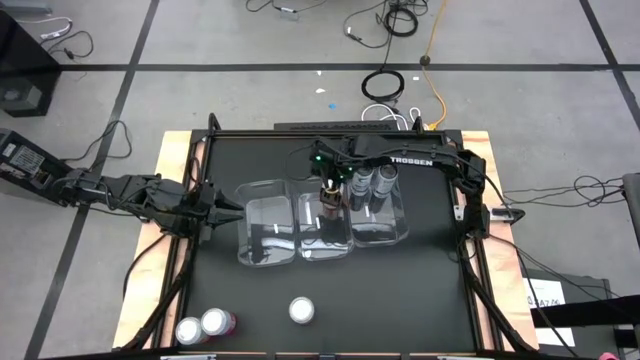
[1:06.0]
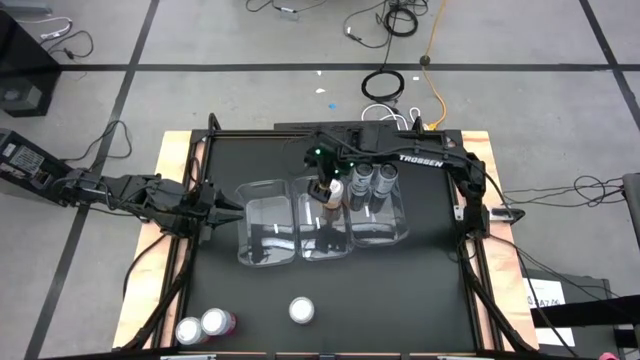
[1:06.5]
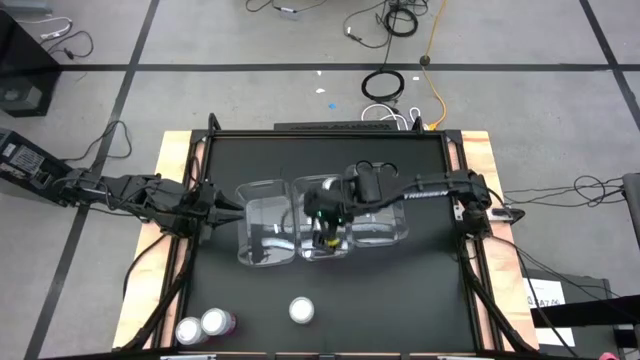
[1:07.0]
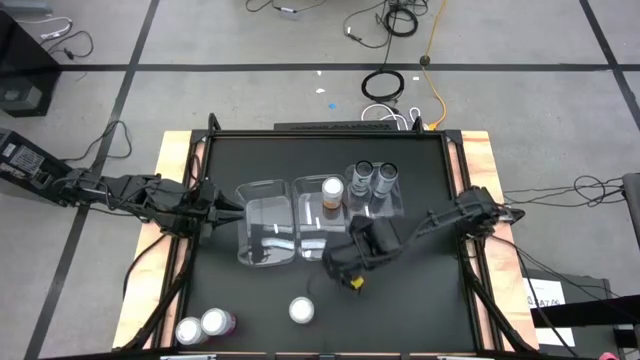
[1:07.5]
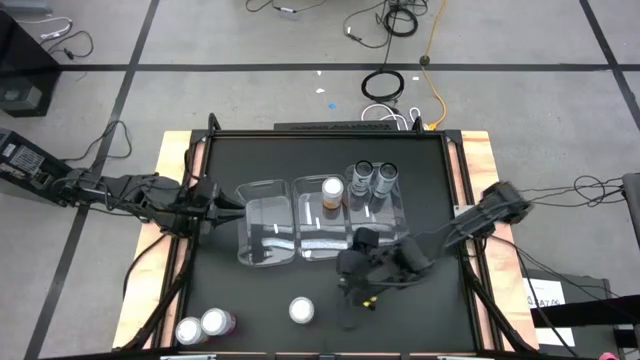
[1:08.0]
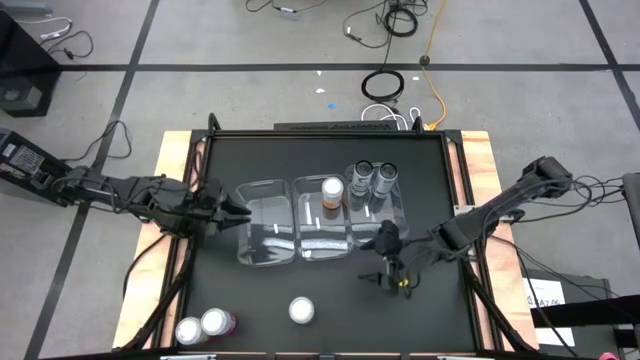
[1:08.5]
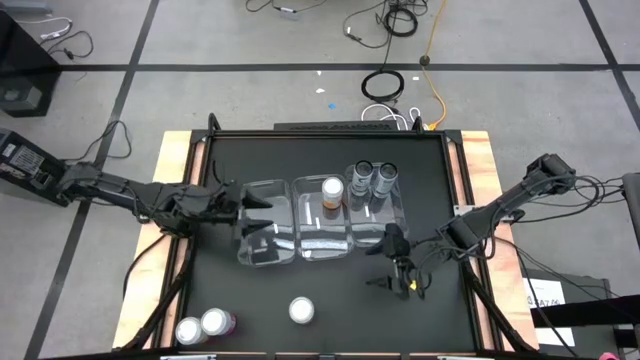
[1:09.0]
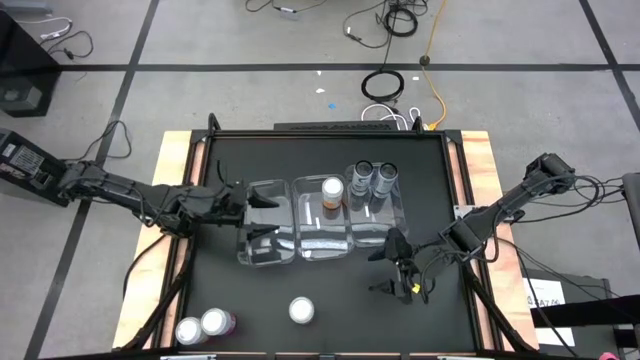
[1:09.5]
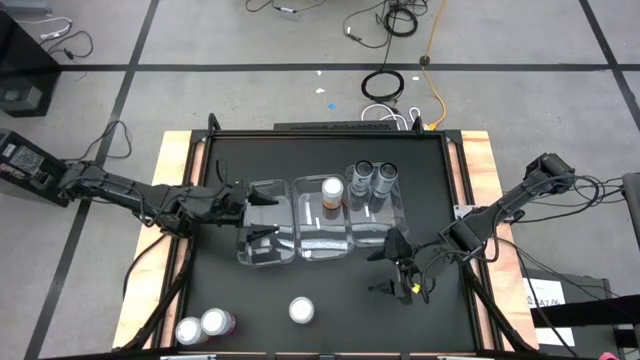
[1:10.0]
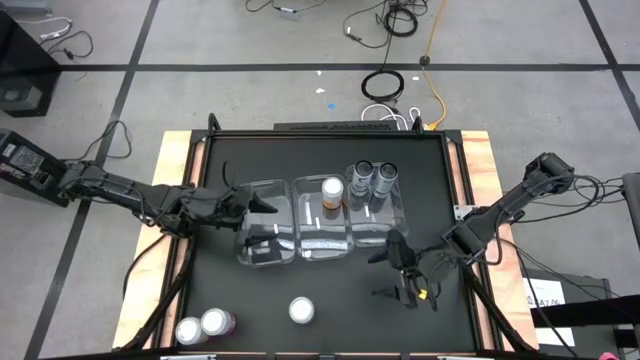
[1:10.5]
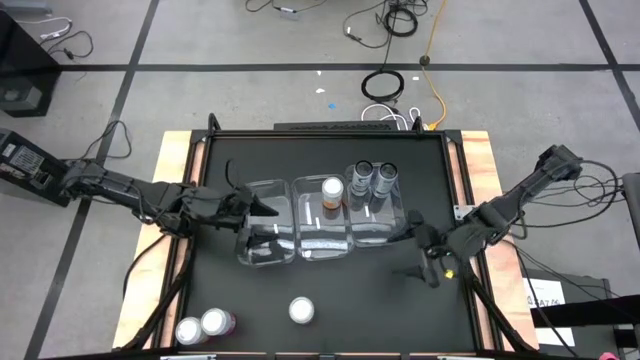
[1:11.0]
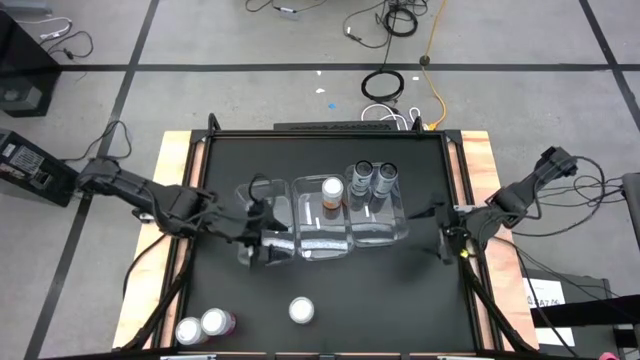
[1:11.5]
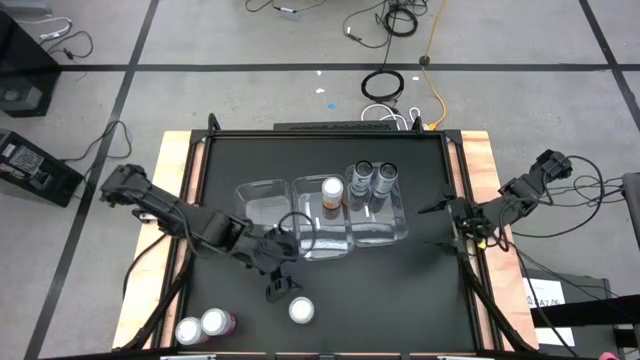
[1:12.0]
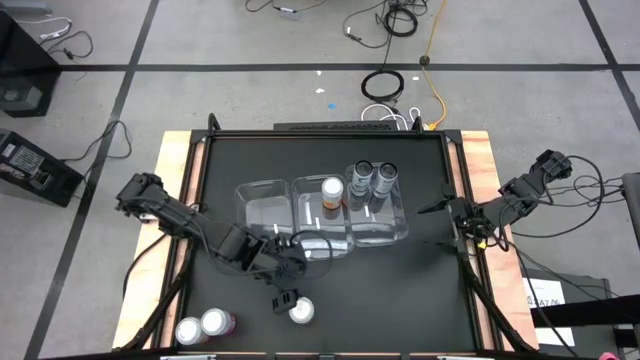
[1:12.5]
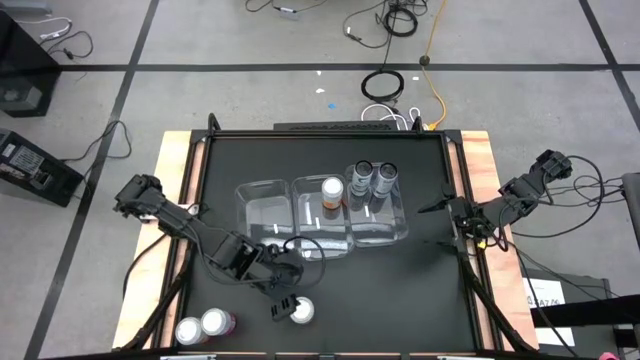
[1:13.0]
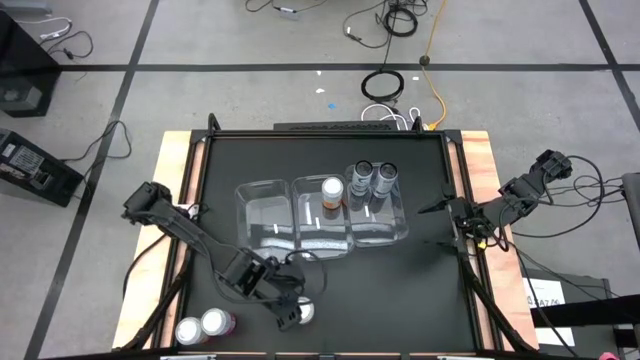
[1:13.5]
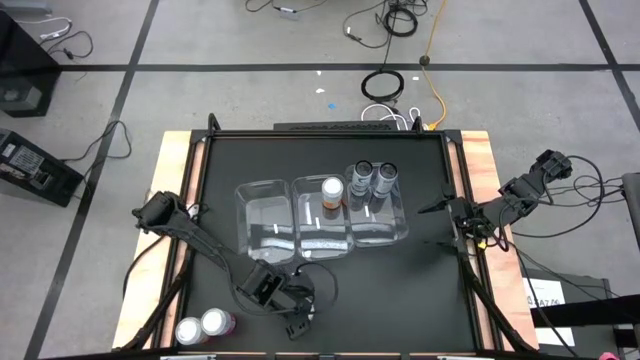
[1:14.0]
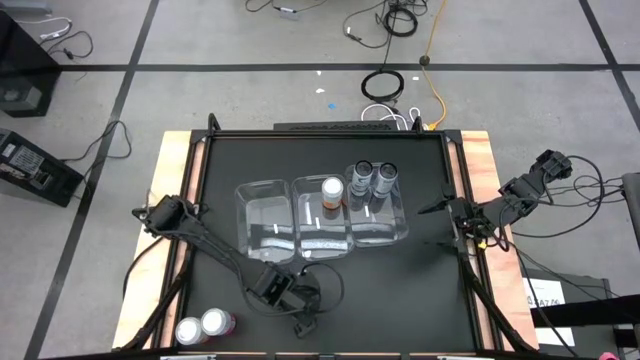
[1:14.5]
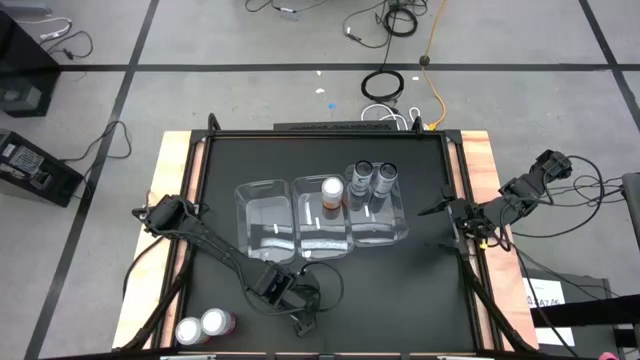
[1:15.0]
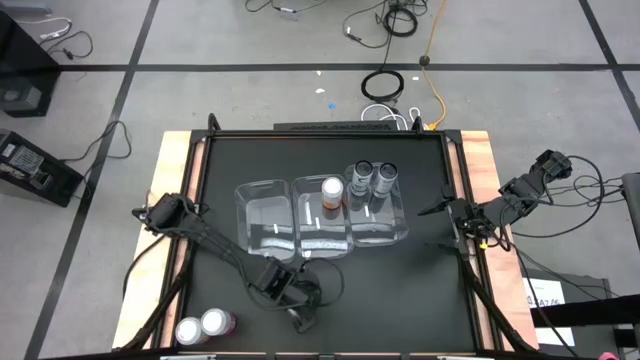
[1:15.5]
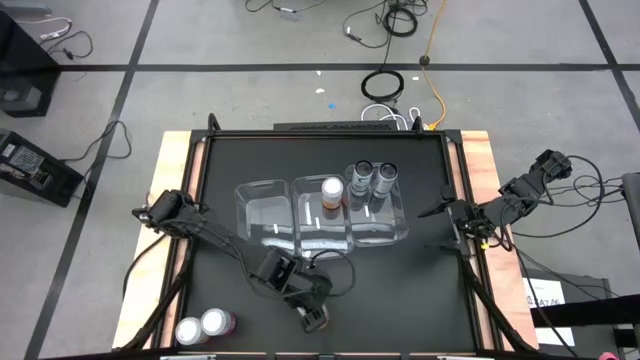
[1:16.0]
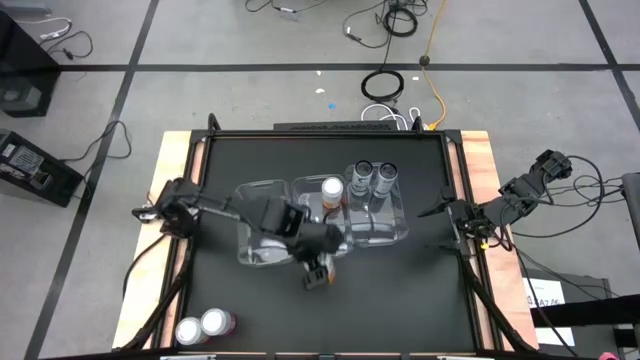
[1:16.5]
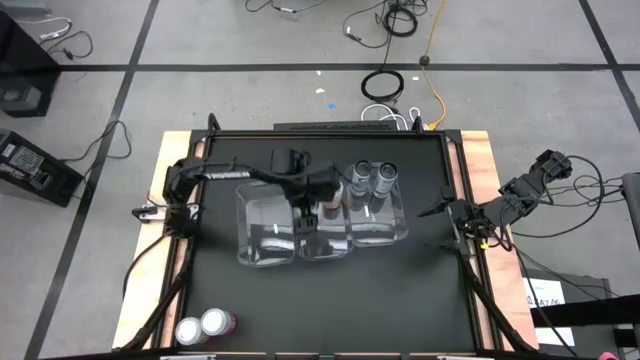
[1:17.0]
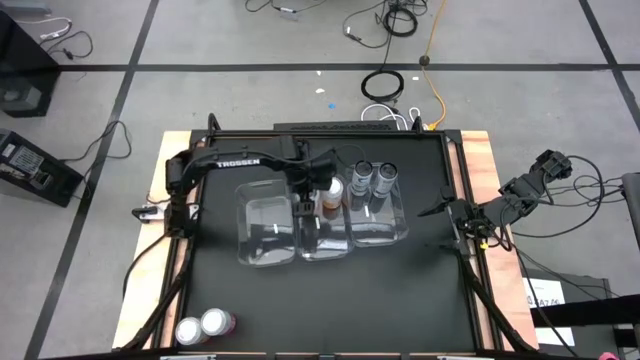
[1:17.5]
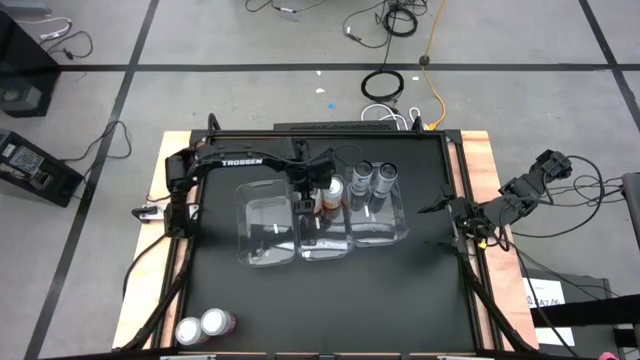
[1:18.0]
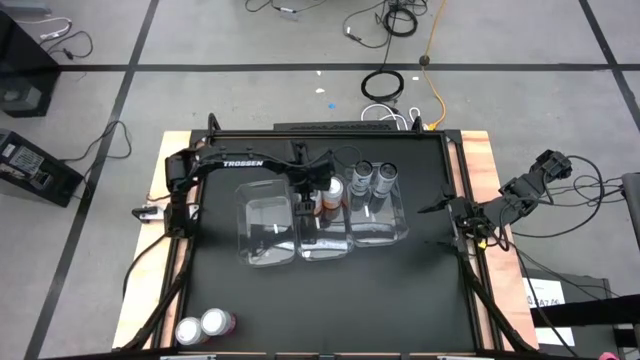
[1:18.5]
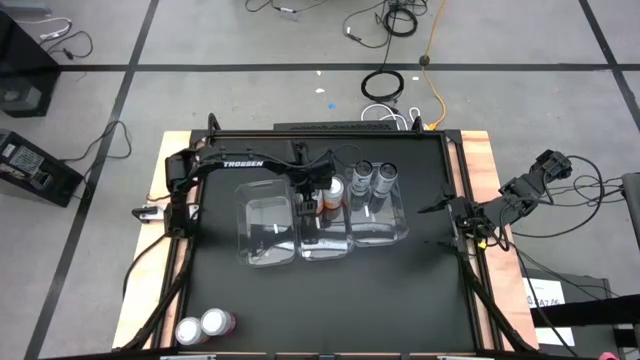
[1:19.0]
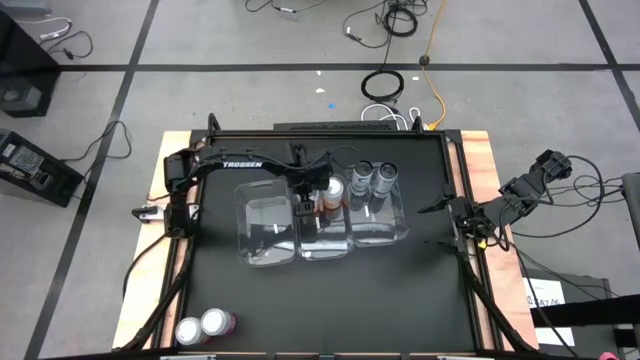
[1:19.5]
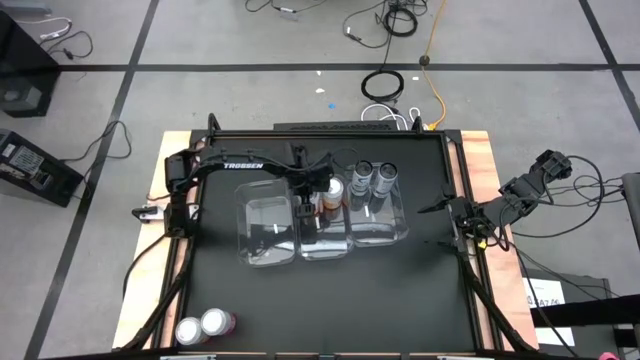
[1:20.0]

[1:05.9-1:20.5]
Task: Sort soda cans
Put the orange soda can into the center transparent bin

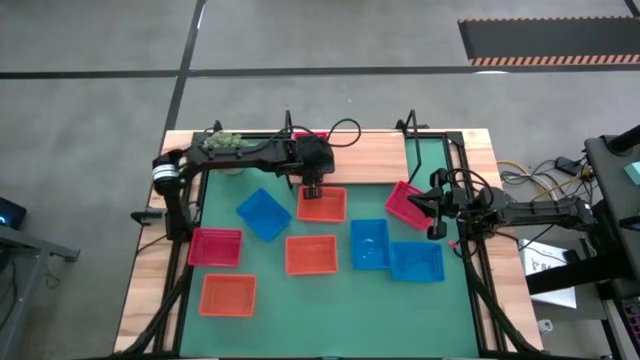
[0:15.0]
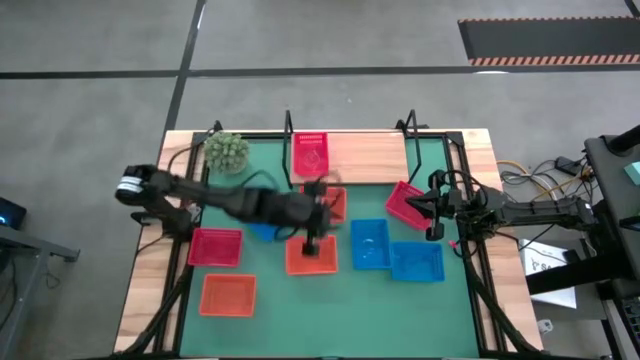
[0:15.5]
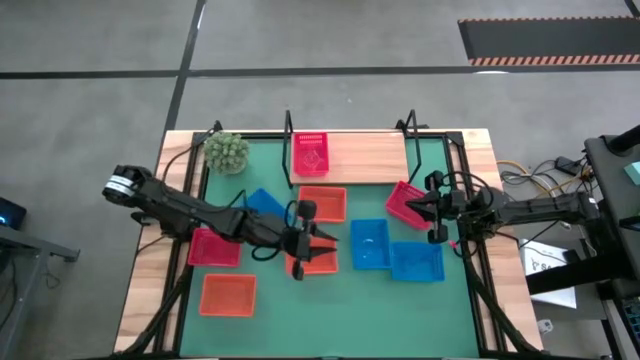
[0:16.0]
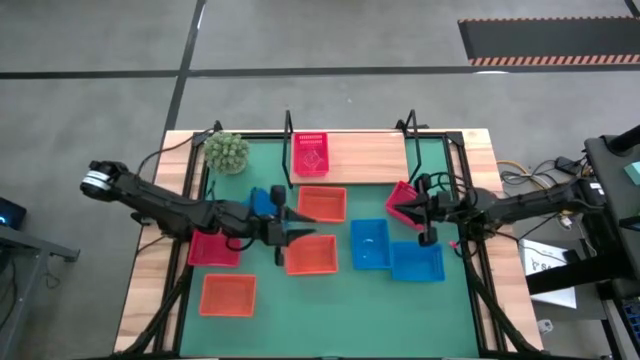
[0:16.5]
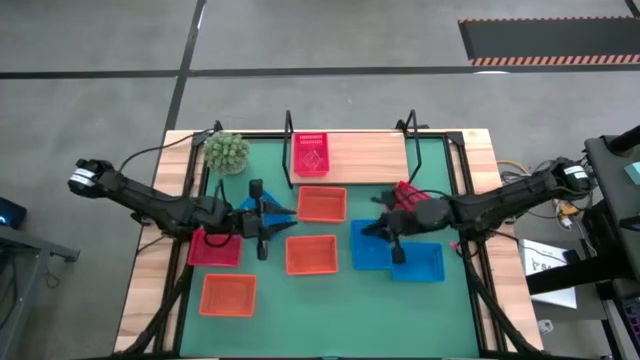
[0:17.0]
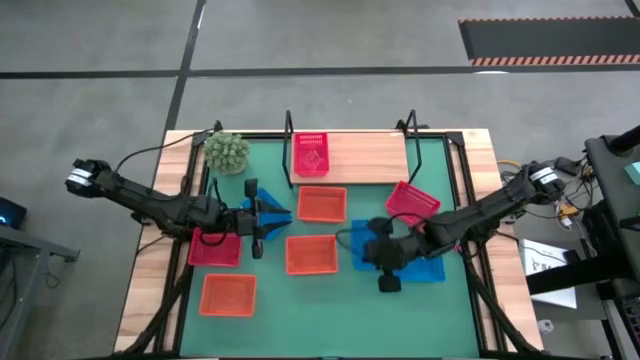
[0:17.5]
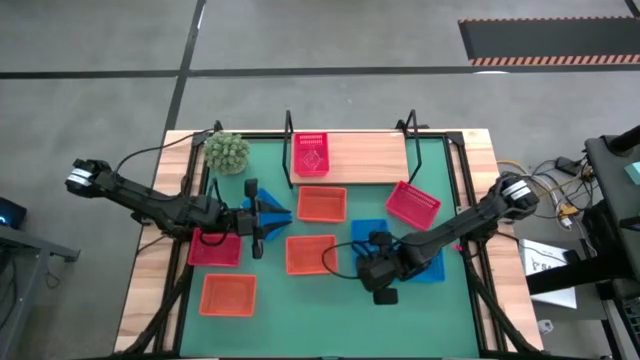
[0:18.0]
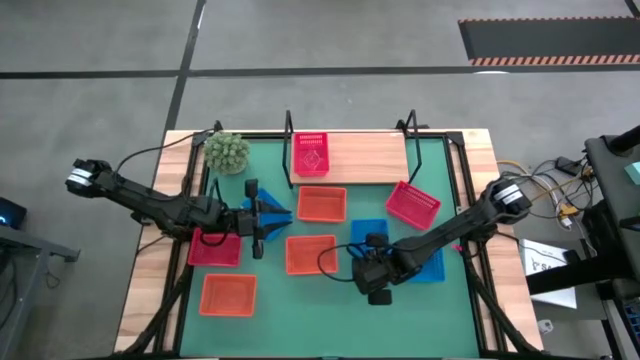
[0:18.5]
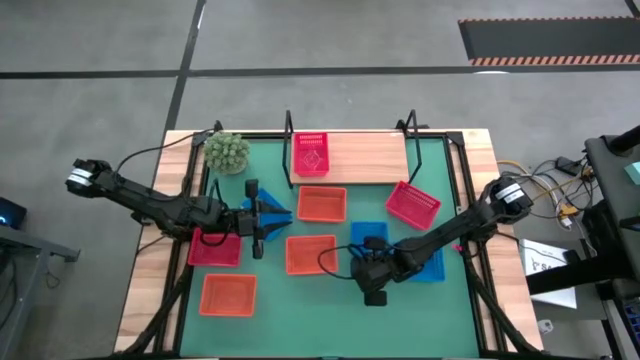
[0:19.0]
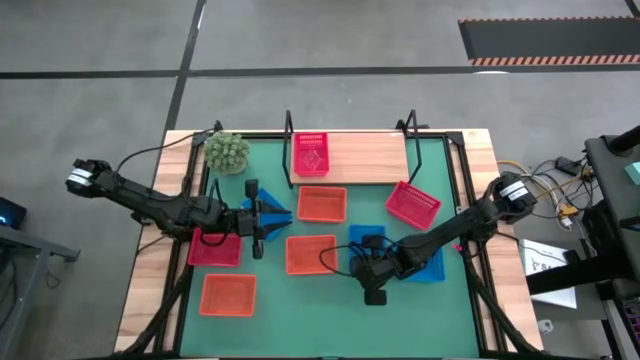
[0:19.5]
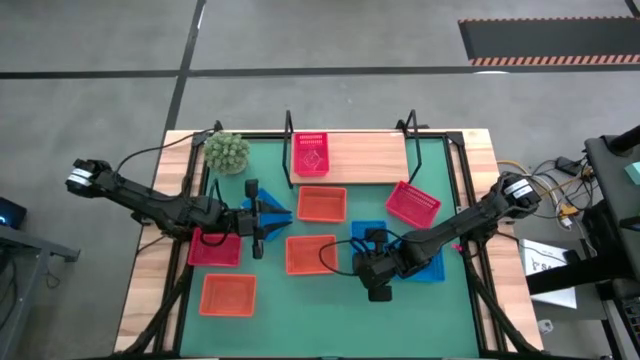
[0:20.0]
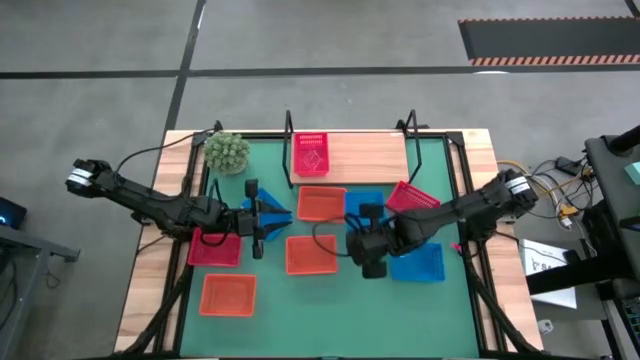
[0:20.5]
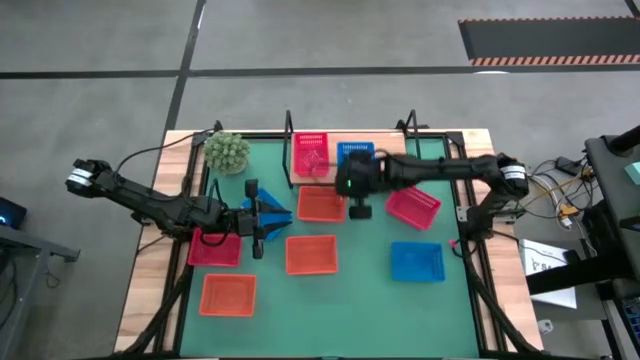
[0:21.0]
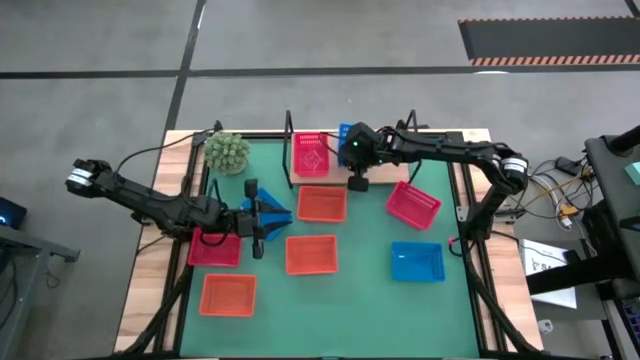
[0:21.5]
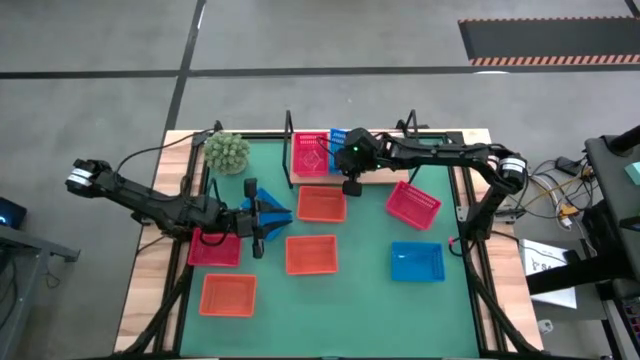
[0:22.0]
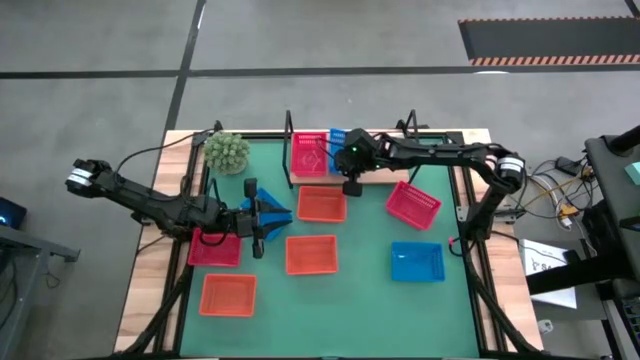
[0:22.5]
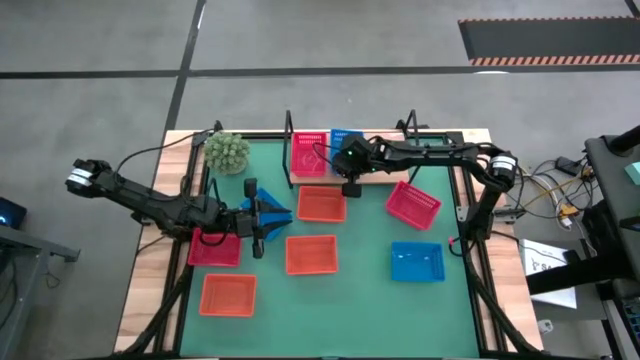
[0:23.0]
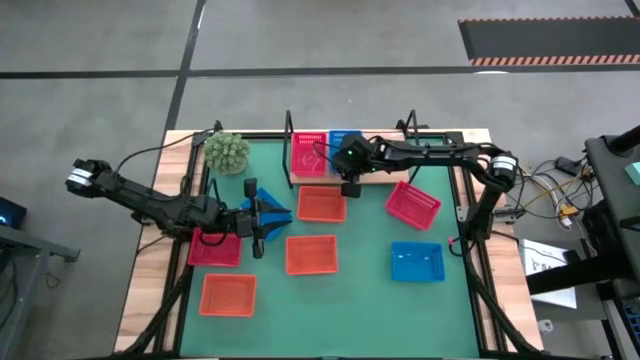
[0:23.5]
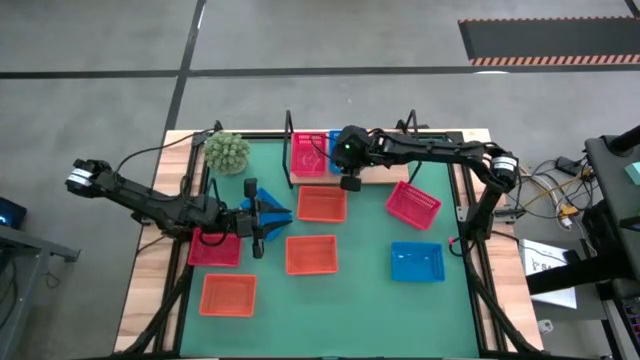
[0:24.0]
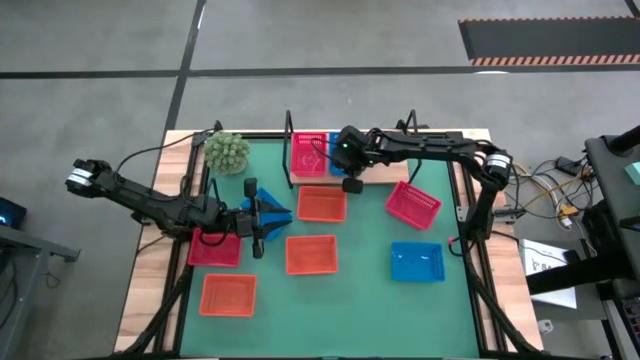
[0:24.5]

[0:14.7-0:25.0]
Task: Stack baskets on shelf by color
Put the center blue bin on the shelf
